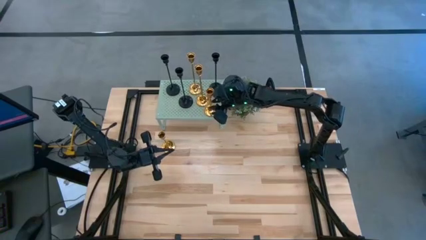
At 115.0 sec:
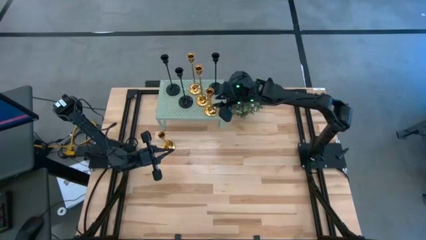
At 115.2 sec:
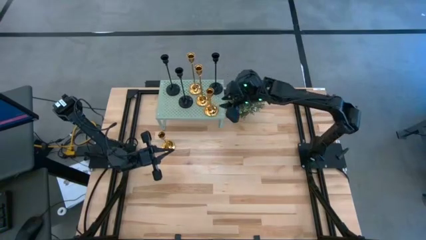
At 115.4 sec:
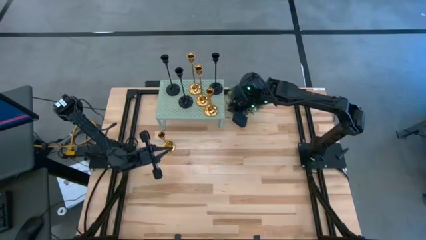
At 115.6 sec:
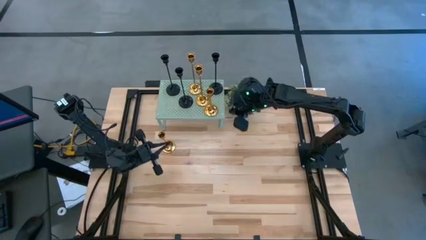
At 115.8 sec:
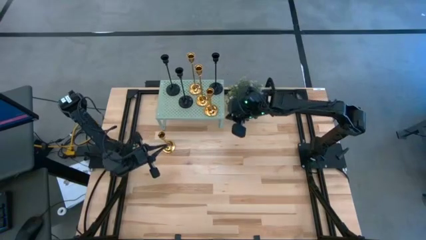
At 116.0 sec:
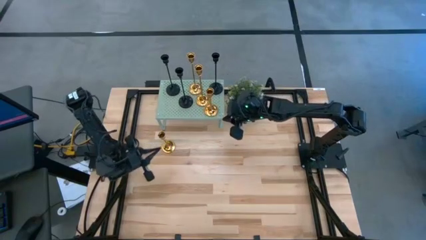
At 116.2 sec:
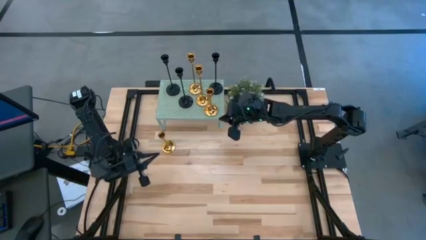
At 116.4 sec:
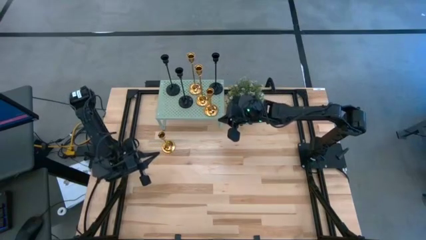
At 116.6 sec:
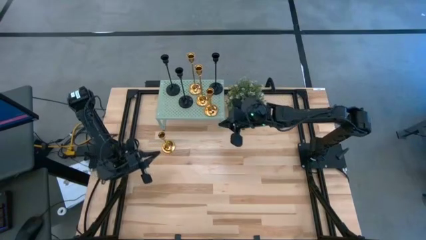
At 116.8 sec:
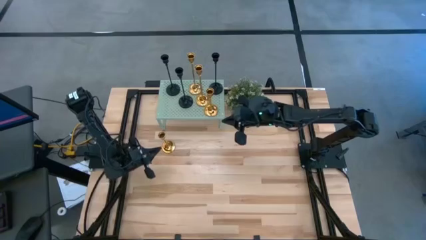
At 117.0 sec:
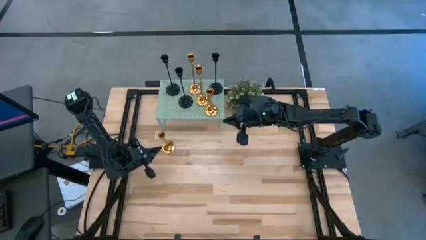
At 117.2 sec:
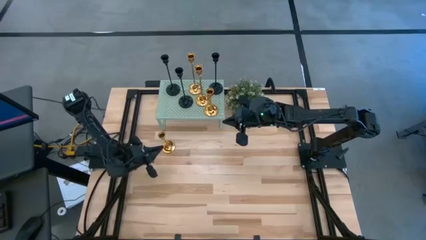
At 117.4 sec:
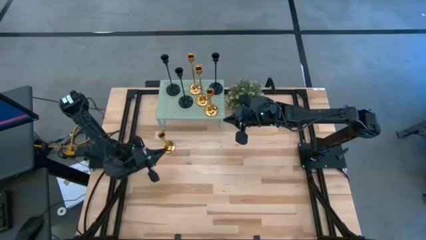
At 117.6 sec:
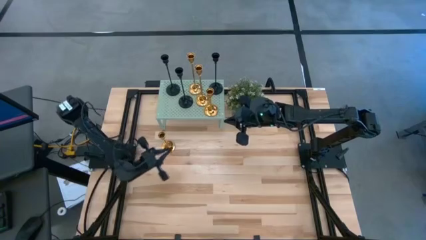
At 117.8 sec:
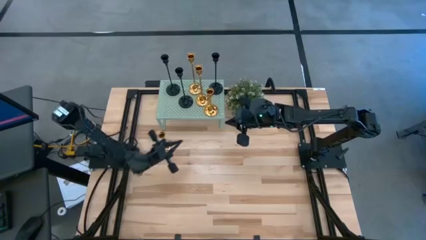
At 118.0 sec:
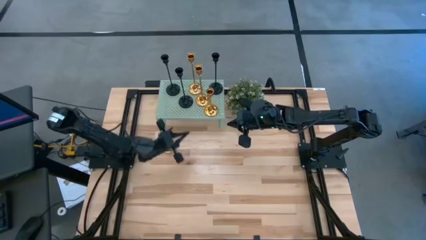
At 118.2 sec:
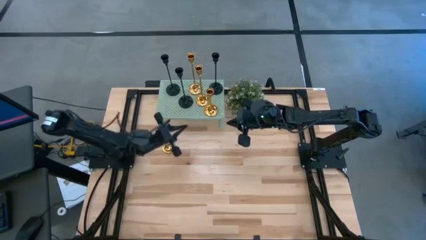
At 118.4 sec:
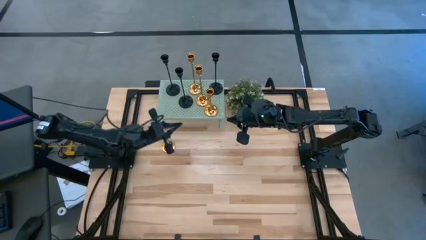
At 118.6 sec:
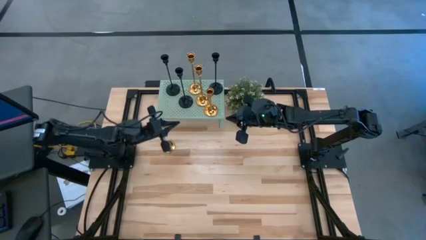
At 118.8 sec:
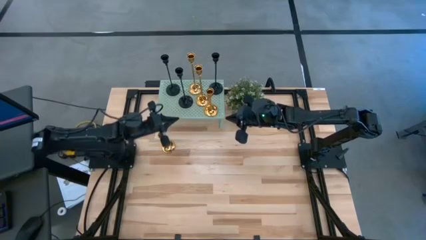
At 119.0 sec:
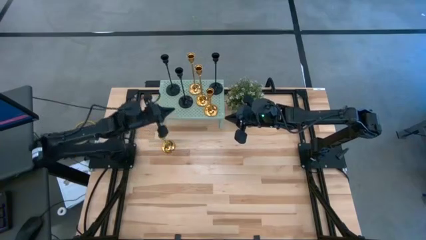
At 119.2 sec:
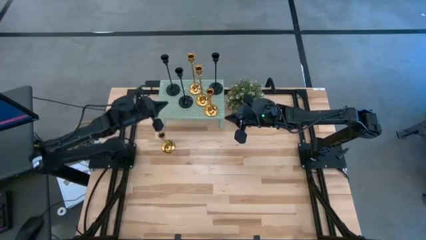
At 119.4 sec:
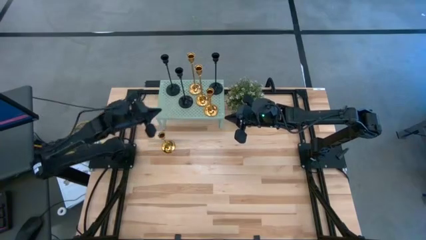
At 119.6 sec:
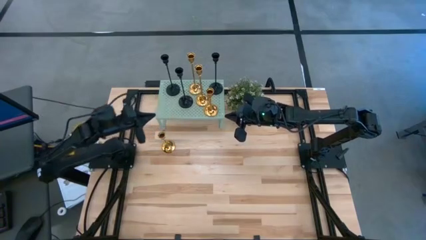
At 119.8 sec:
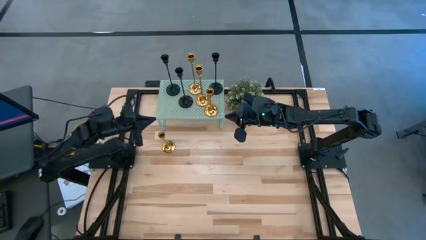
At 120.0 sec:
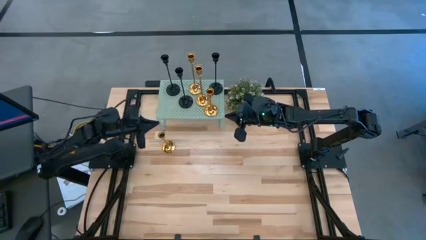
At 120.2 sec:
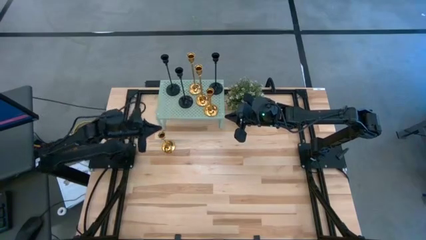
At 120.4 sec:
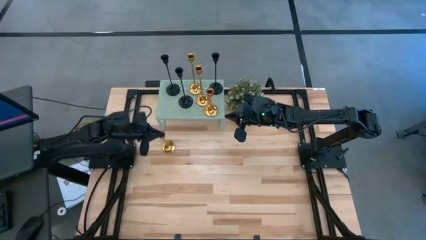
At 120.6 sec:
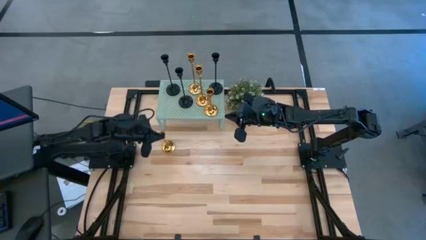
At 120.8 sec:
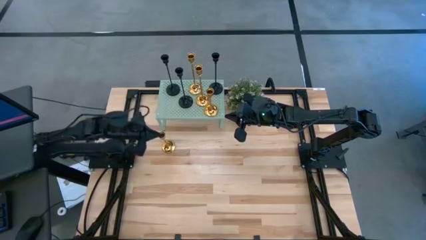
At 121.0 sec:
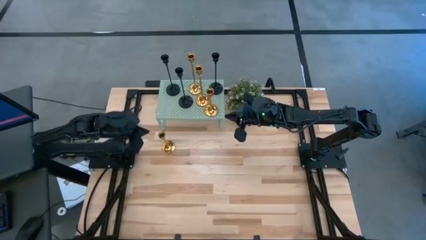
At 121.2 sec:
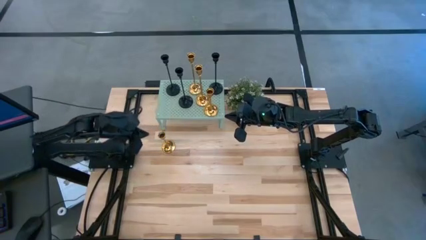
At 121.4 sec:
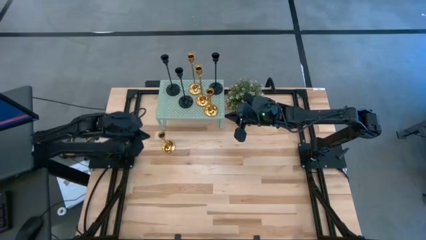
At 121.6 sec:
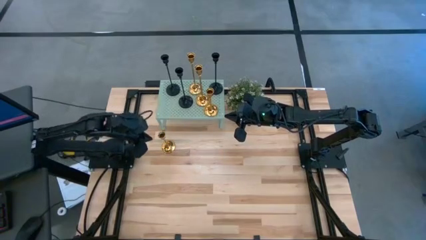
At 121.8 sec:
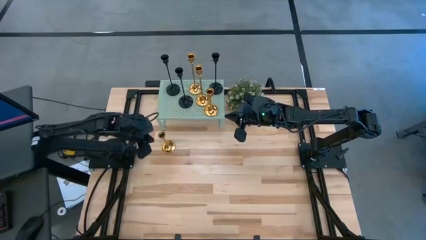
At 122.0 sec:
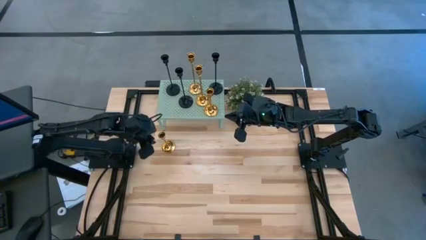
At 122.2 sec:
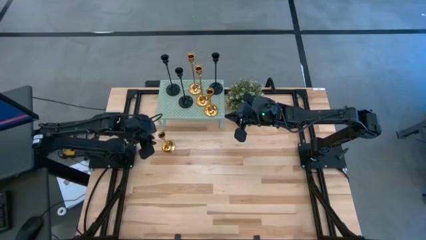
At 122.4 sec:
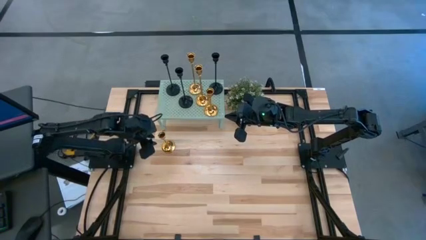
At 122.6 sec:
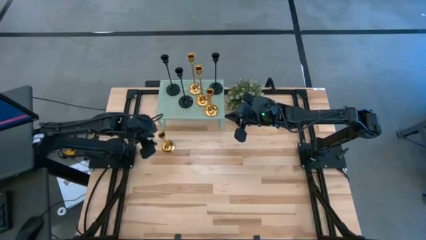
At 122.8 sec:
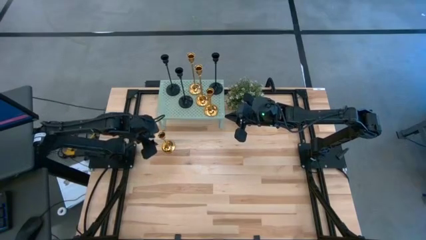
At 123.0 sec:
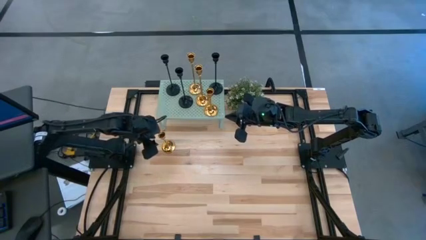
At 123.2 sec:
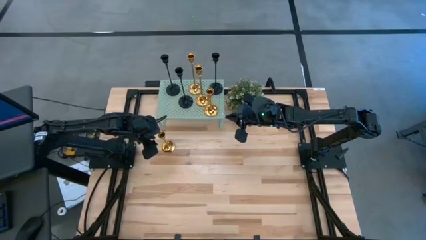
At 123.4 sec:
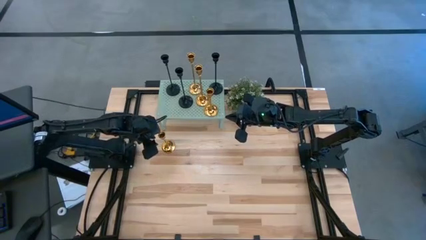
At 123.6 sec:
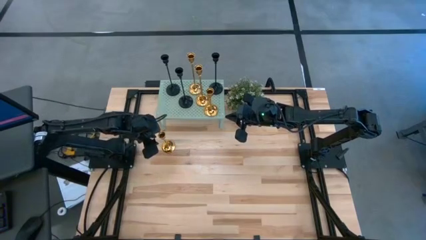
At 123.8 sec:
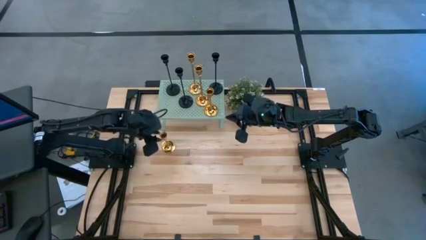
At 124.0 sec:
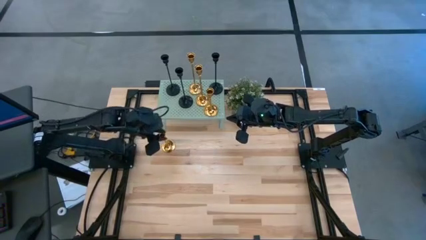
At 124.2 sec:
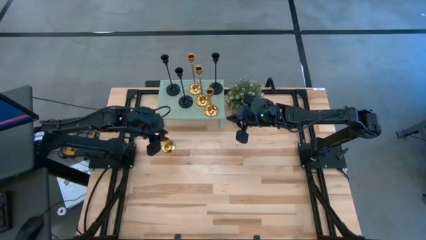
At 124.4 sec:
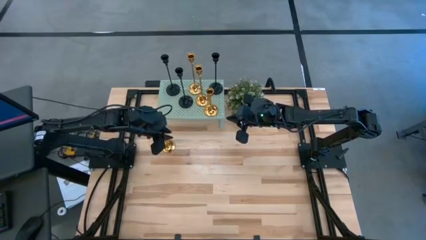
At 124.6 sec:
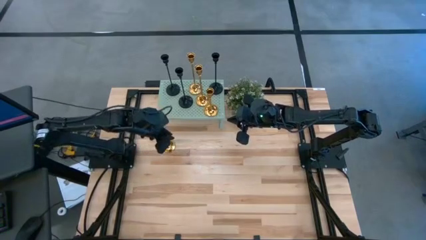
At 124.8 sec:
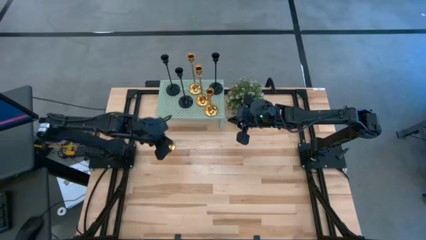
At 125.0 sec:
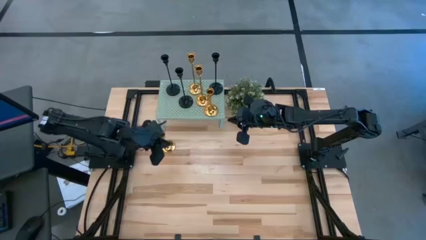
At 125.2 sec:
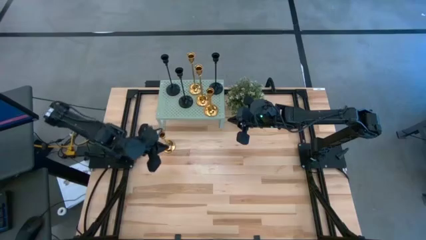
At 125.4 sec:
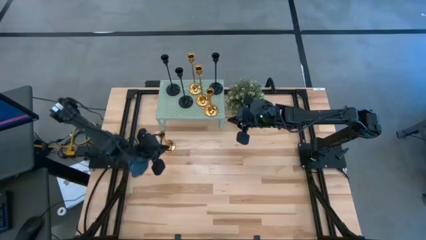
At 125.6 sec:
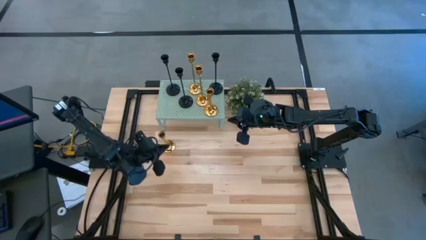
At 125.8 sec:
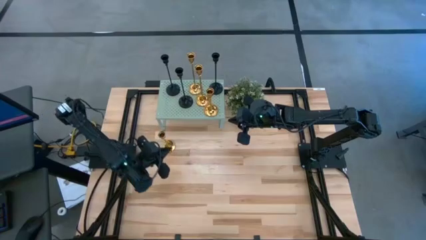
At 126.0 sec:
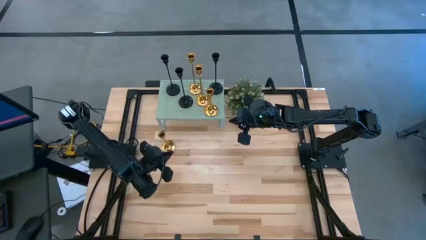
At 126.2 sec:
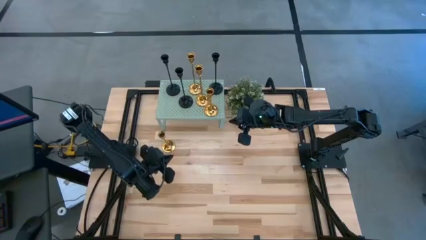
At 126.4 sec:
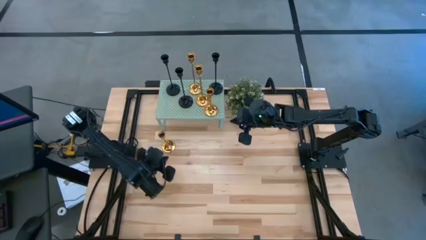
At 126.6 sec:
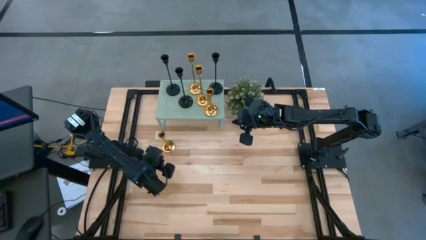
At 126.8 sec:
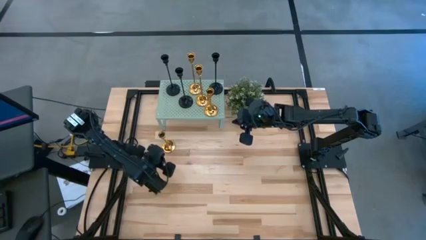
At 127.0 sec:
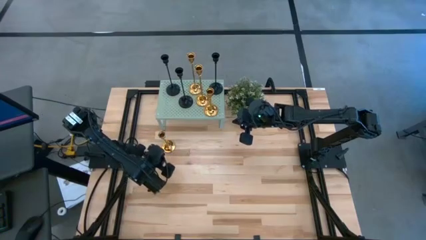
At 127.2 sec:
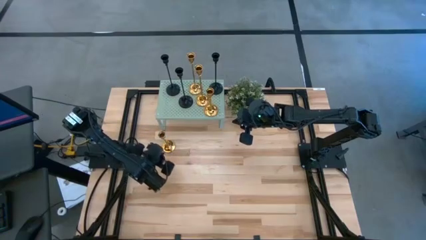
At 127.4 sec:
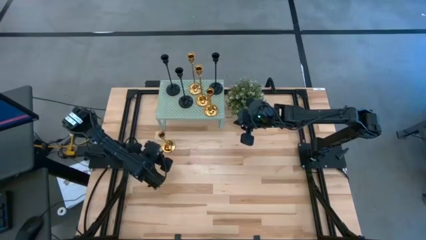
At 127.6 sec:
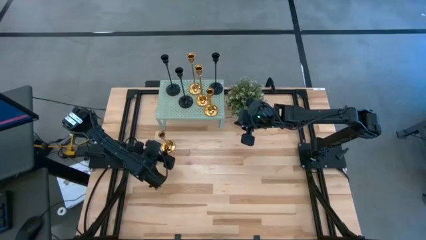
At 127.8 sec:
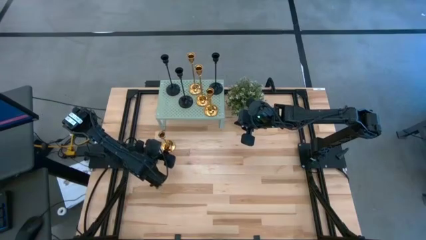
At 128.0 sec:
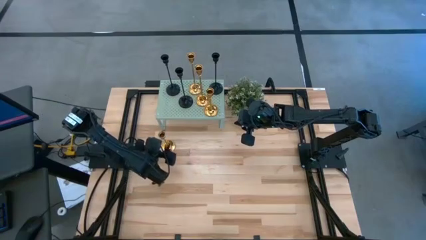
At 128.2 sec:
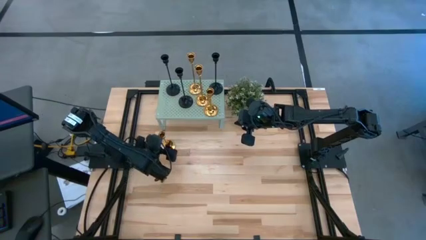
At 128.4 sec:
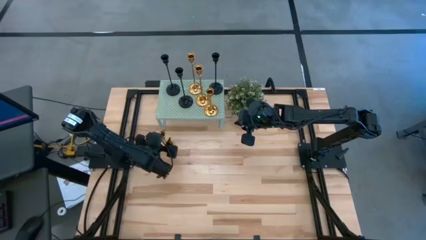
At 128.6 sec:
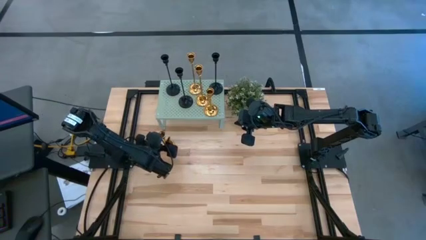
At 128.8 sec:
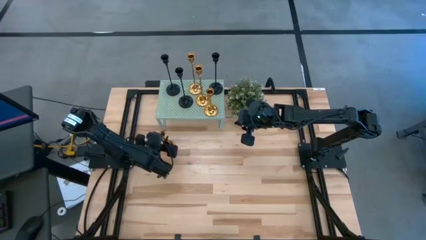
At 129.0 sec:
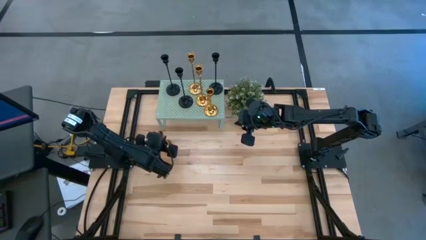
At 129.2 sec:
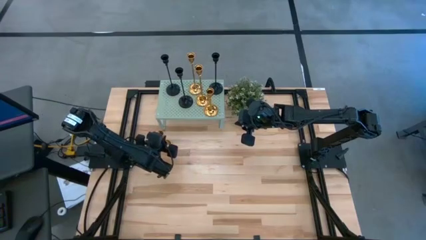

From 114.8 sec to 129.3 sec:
Task: Pick & Place candle stick holders
Put the gold candle holder on the shelf aligned with the gold candle holder

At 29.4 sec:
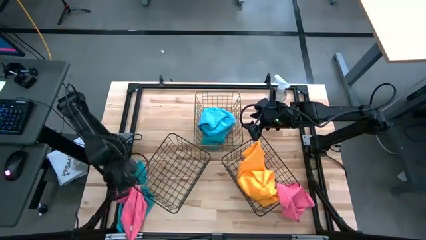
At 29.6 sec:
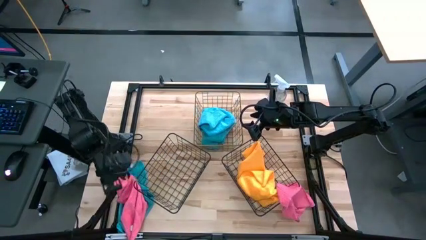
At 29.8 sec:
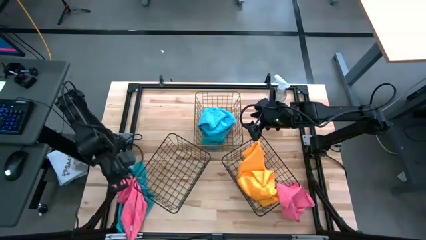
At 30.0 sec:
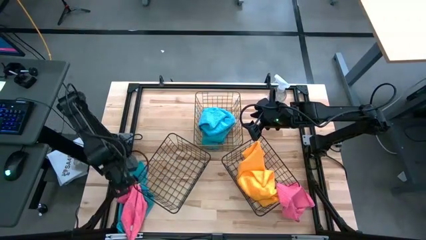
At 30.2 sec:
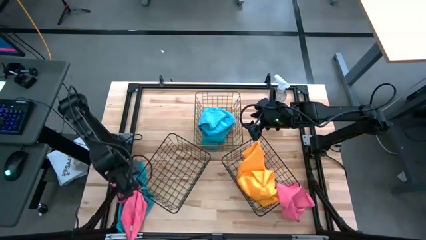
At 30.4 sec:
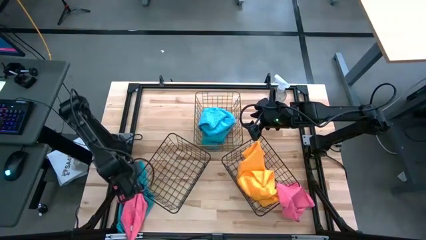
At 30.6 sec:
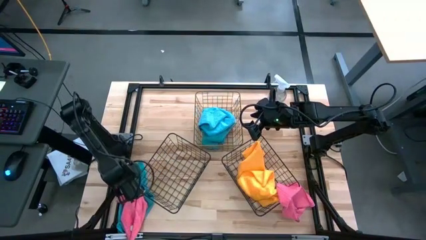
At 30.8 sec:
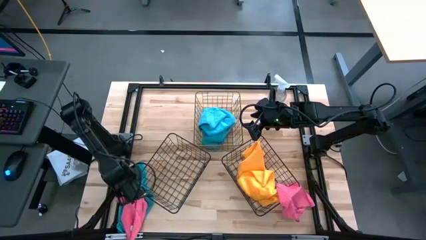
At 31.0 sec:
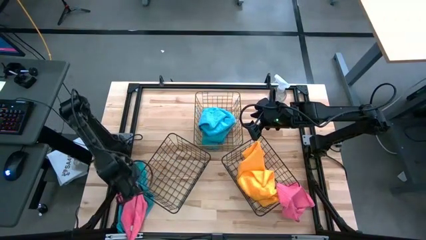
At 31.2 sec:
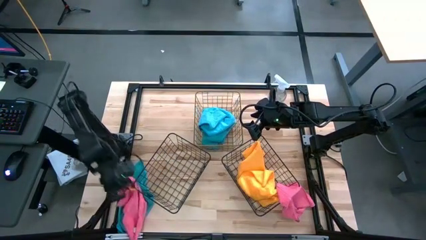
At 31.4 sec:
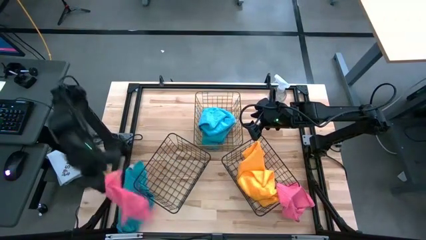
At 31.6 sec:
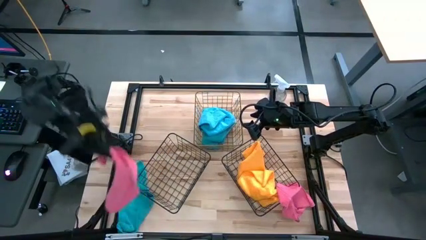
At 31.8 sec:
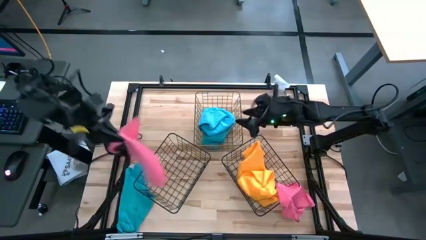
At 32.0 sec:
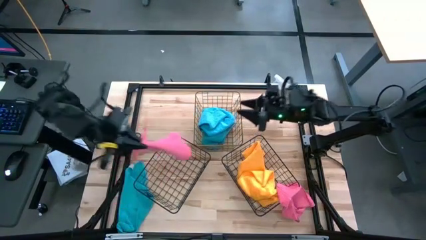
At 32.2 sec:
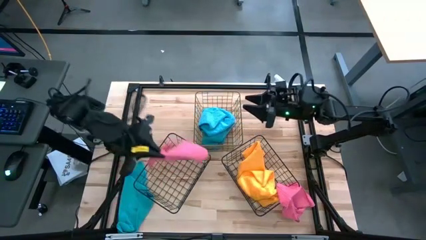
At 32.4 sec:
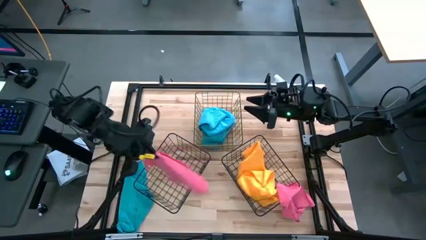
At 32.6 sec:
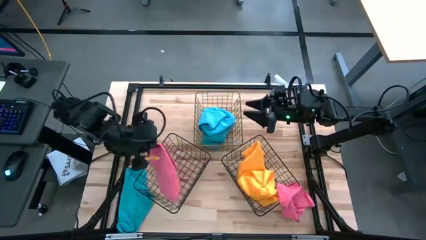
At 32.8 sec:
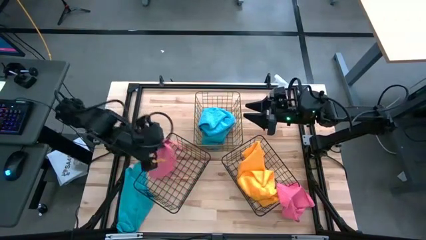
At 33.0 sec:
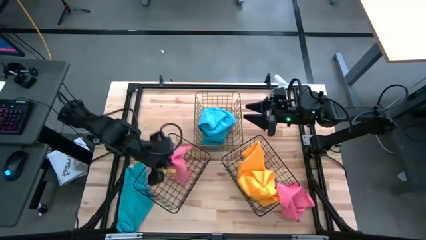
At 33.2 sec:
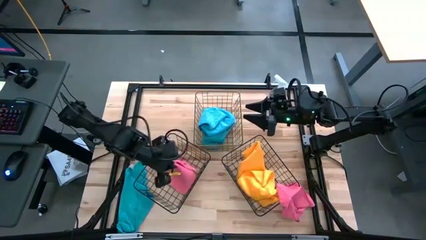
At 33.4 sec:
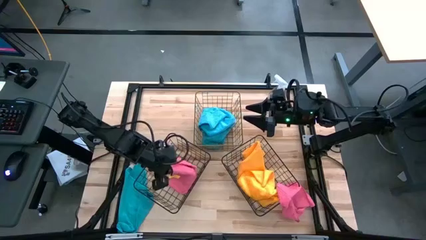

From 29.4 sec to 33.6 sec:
Task: Sort microfiber towel by color & place in baskets
Put the left pink microfiber cloth into the bottom left wire basket
